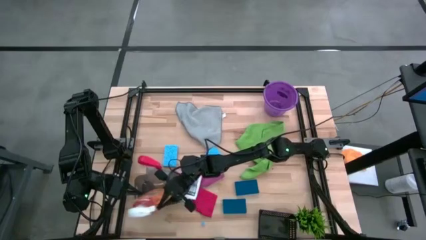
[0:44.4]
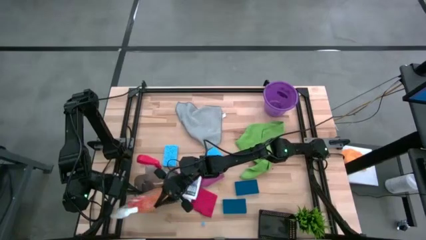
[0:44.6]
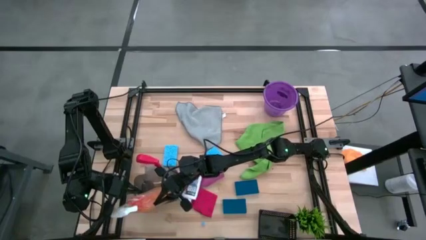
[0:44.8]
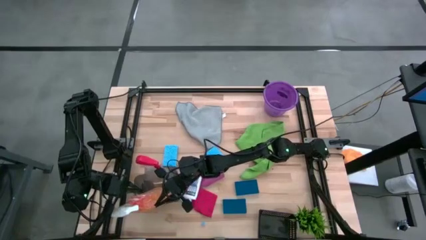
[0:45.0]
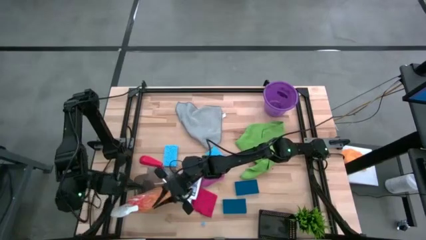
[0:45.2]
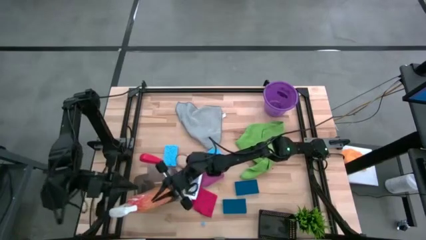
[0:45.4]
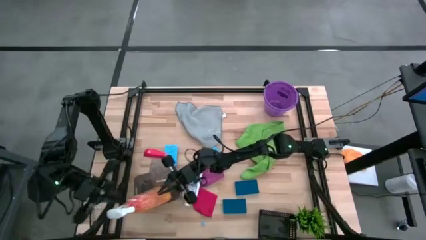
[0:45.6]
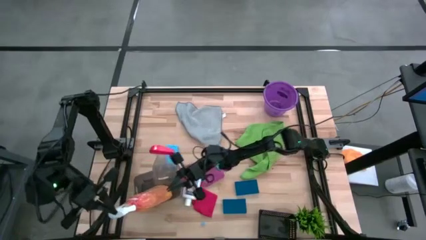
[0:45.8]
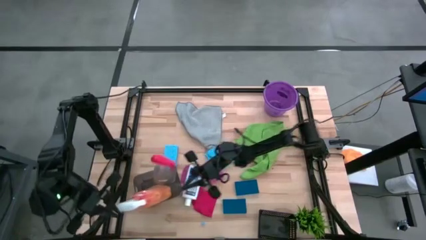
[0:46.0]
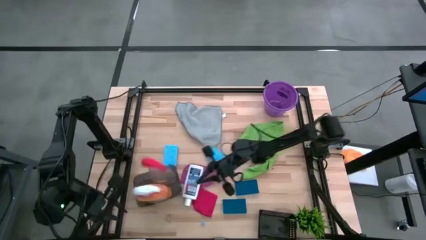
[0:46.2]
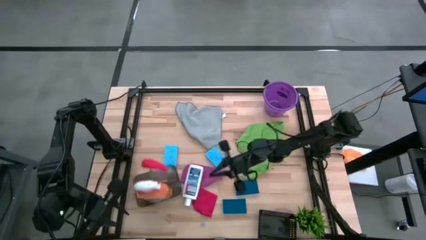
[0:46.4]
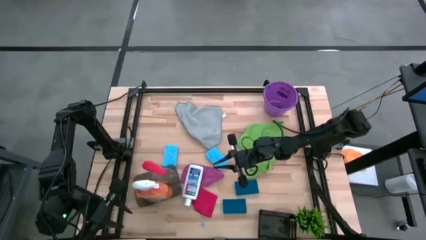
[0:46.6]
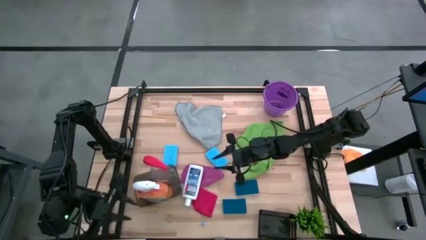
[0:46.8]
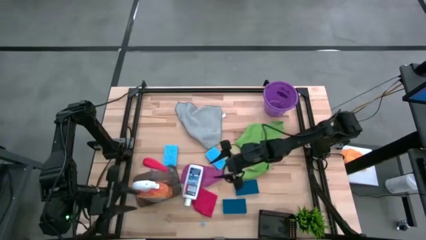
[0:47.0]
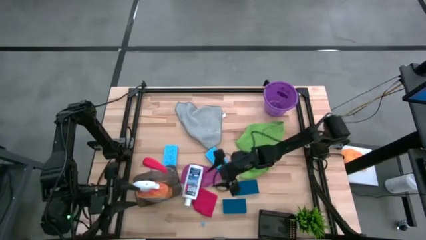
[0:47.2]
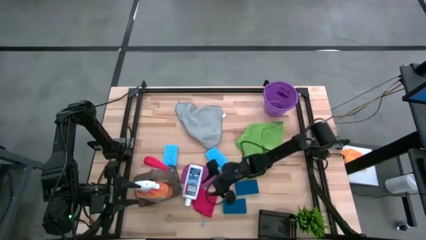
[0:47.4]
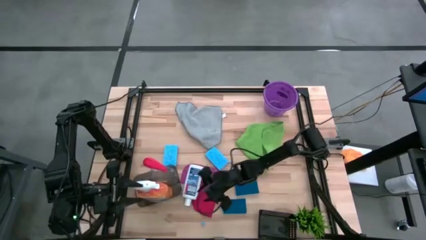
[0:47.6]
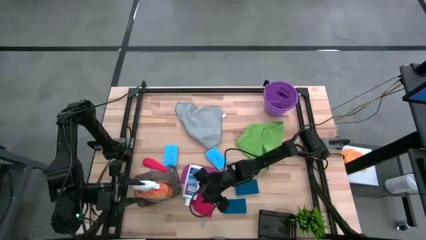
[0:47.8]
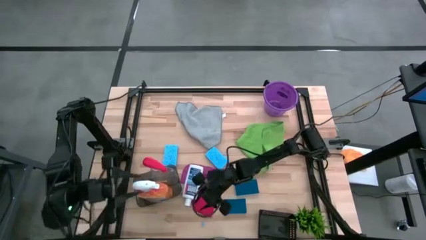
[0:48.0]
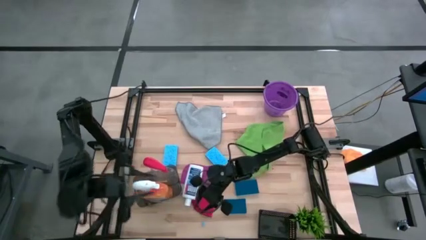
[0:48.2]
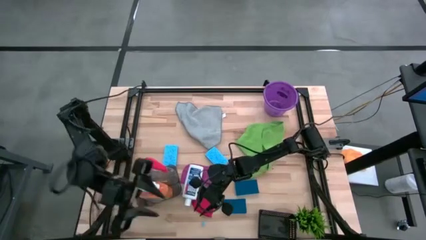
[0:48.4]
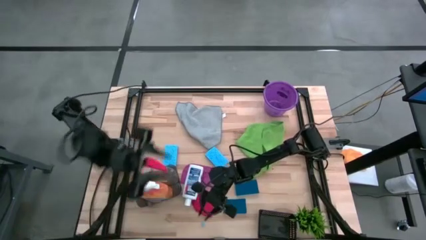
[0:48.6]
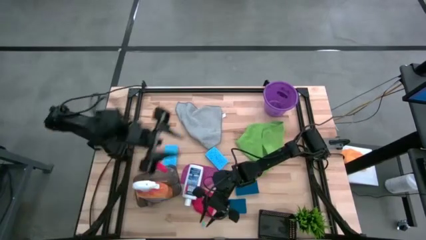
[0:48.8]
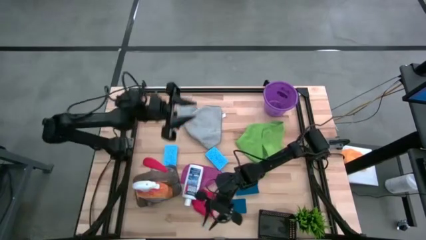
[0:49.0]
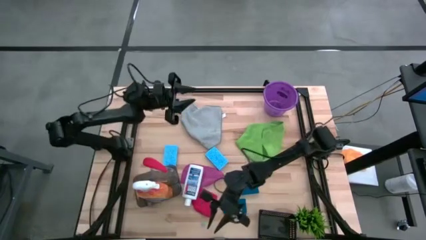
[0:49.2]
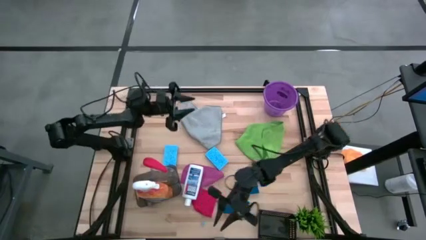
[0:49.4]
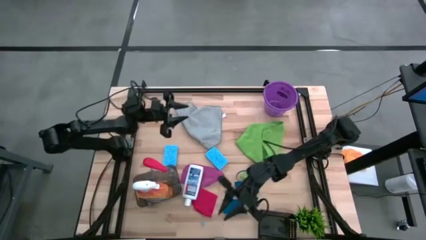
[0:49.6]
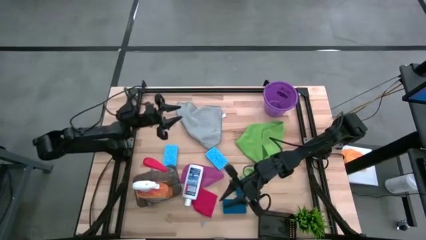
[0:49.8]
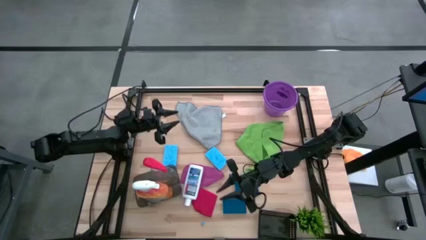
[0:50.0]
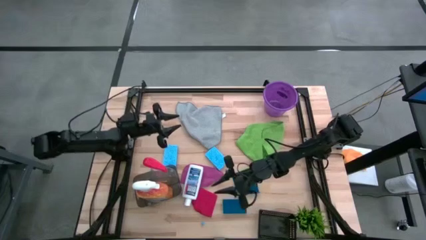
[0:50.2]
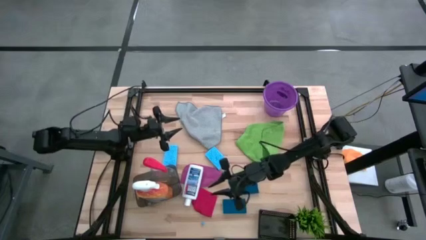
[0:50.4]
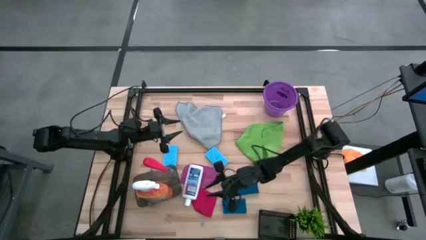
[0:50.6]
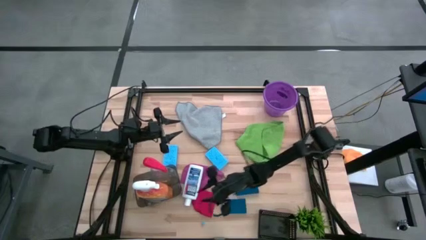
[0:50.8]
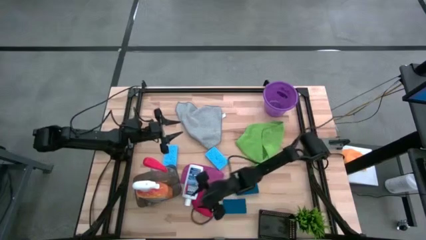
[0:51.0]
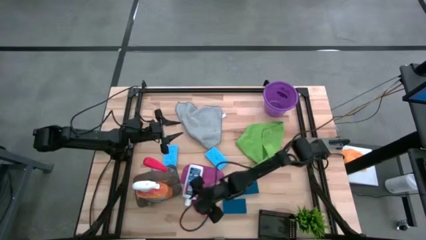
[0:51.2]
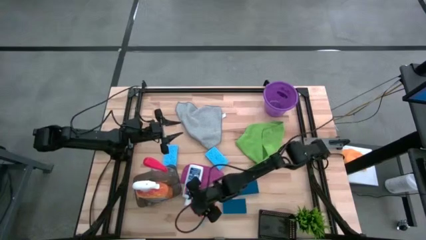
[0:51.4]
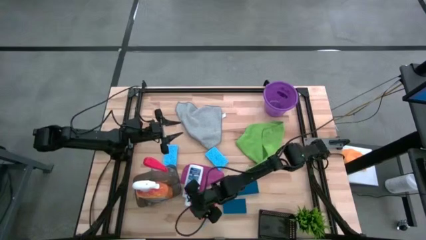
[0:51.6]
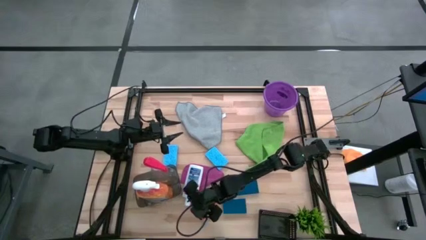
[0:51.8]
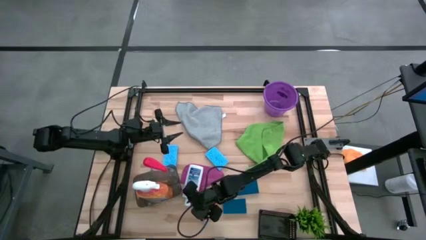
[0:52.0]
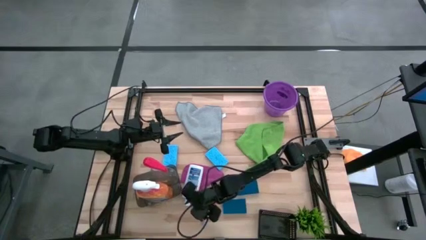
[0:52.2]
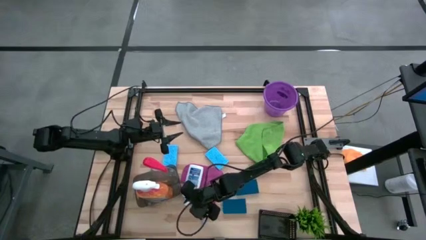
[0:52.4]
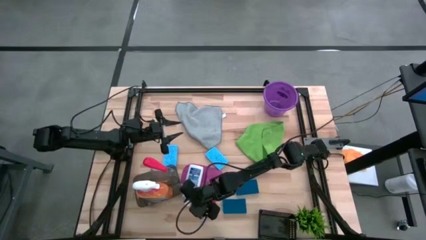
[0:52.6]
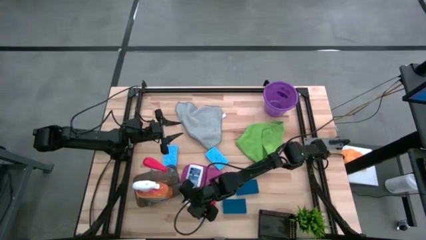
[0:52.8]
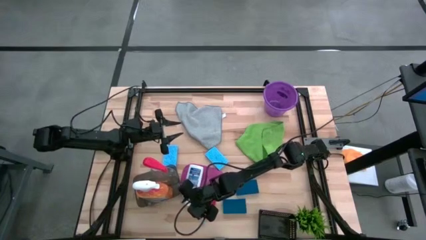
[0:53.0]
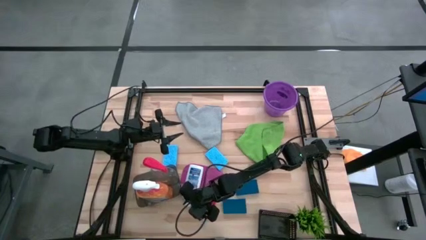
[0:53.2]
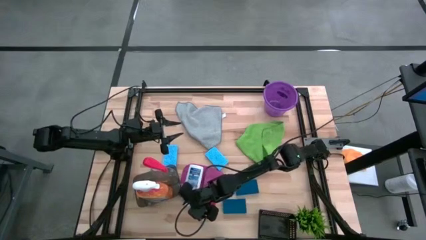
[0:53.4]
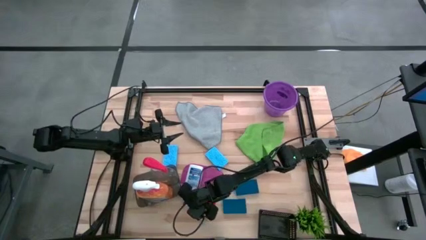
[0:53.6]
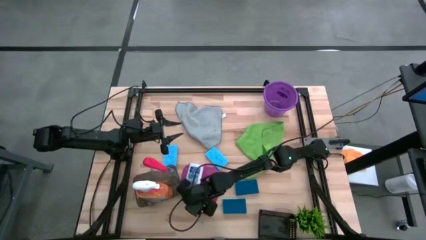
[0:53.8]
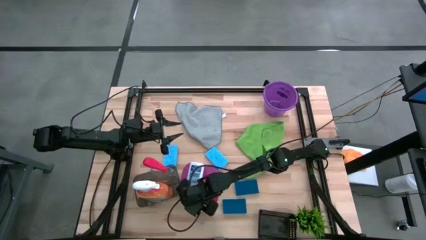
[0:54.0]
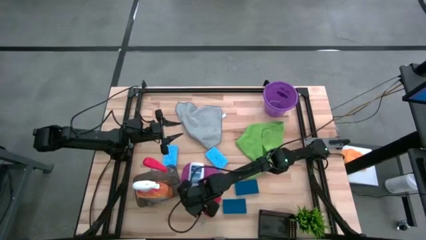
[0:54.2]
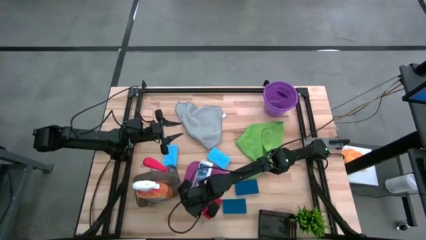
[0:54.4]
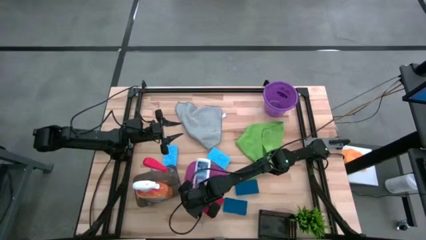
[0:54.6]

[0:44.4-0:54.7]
Task: Pick & Place Kitchen Items
Put the white plastic restorer bottle into the gray bin

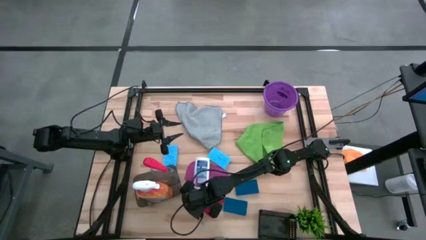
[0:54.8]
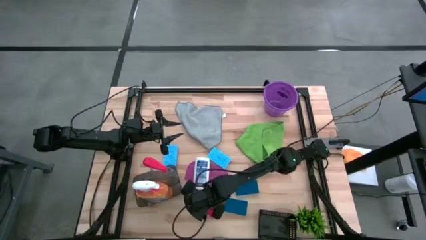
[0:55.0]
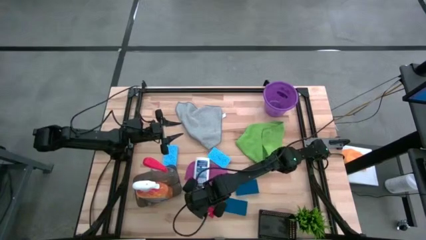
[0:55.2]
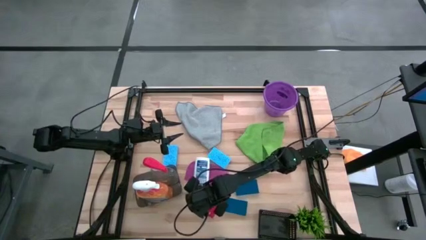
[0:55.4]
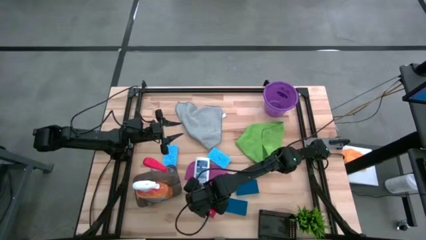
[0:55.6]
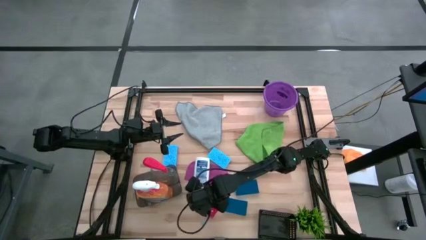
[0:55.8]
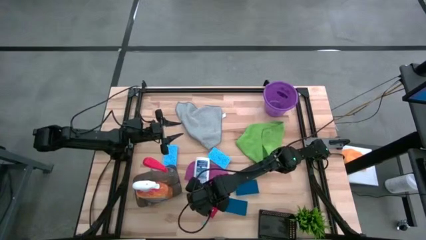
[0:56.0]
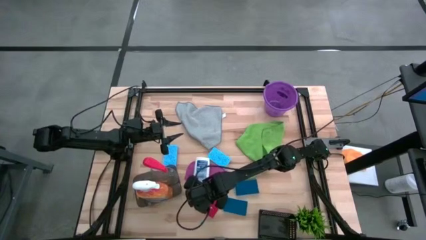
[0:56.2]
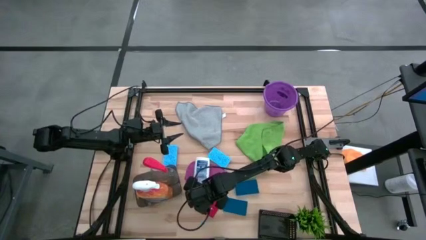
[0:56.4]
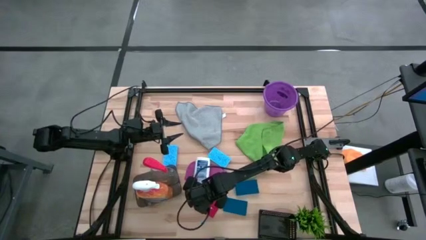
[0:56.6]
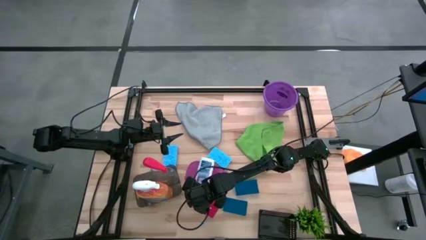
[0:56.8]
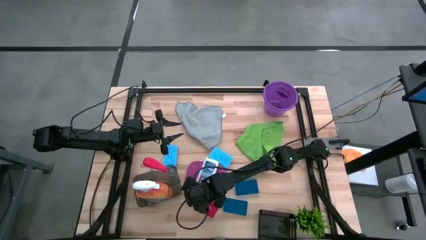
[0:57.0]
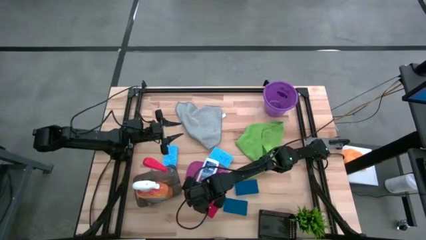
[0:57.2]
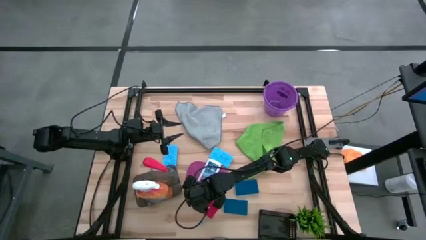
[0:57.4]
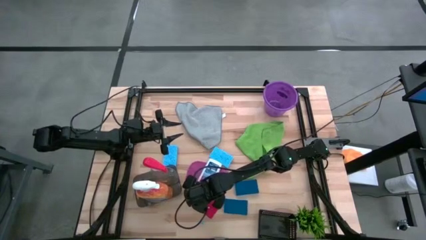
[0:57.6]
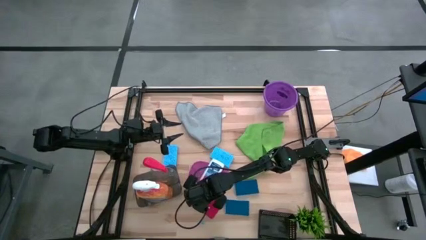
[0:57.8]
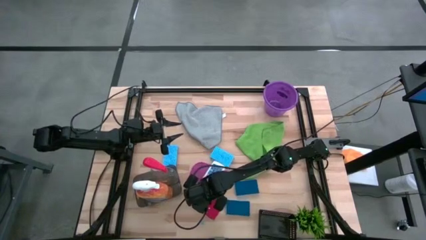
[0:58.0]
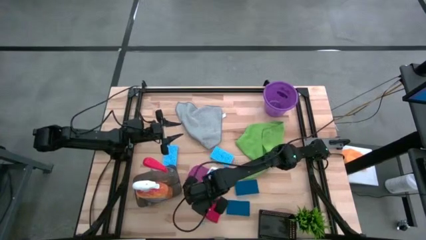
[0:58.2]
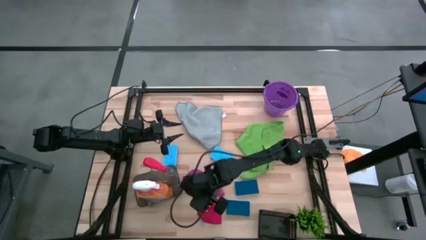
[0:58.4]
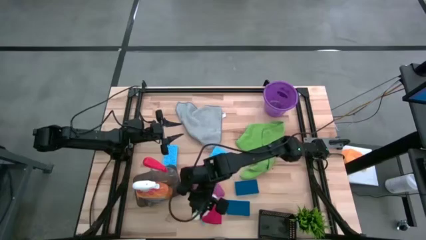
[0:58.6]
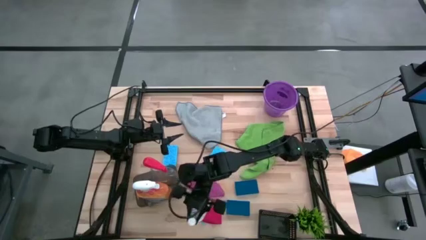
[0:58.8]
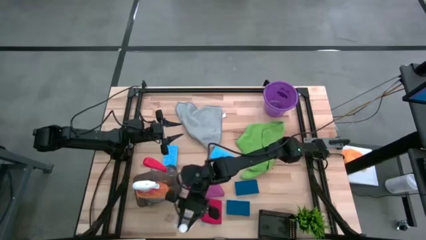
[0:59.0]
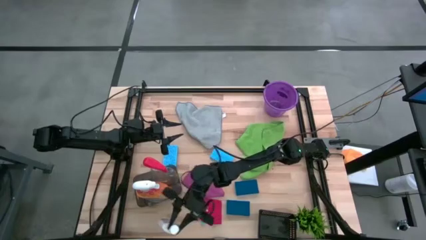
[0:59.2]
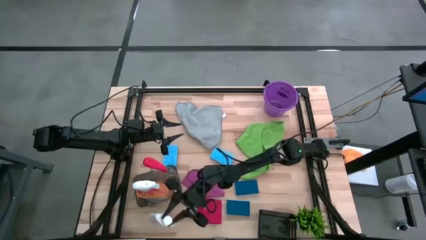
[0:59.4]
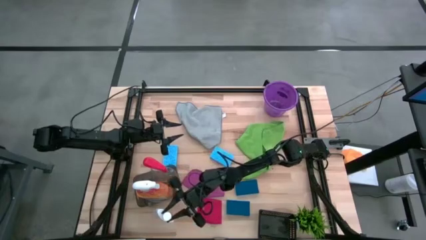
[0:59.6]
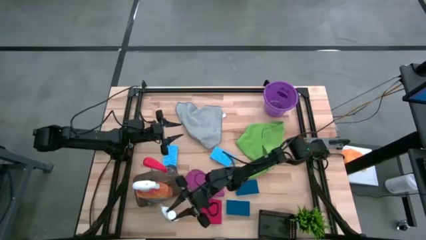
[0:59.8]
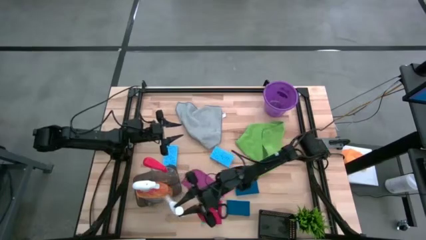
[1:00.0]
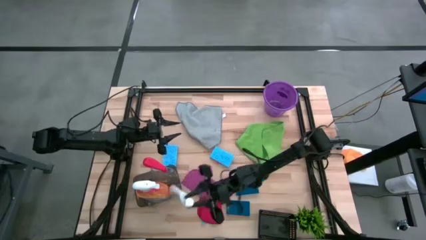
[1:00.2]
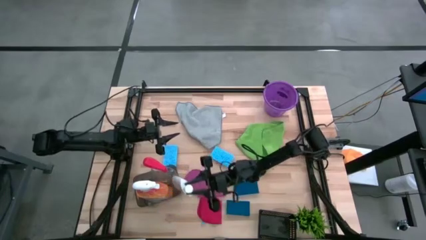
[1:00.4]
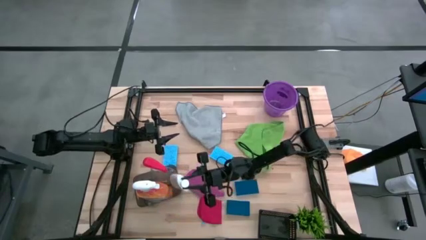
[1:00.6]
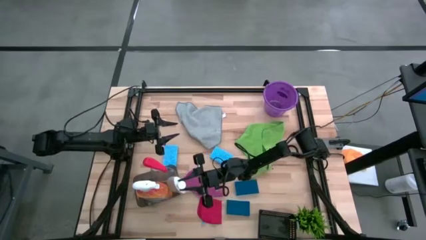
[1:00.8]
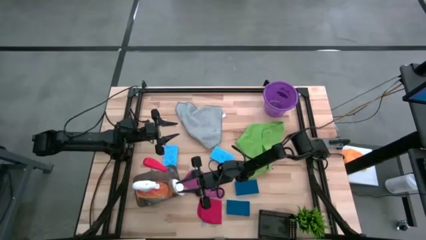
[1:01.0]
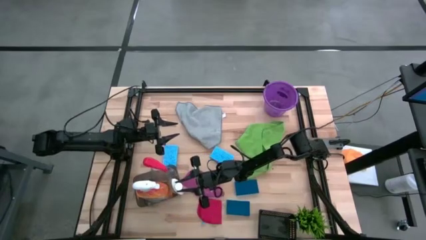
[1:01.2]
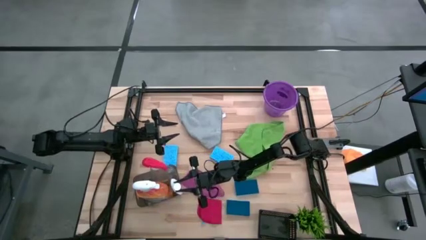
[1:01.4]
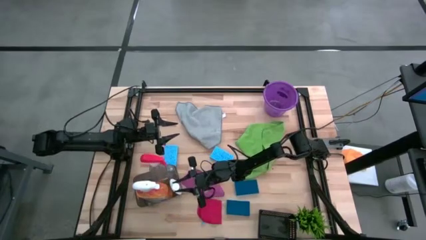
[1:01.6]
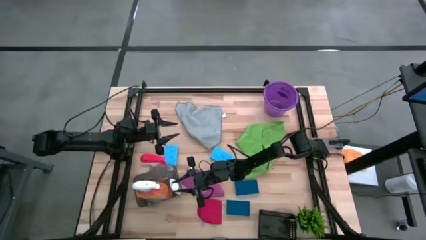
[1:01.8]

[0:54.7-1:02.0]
Put the white plastic restorer bottle into the gray bin
